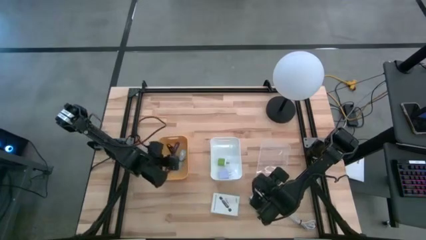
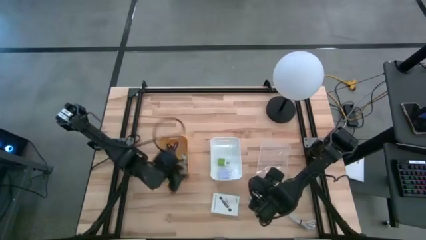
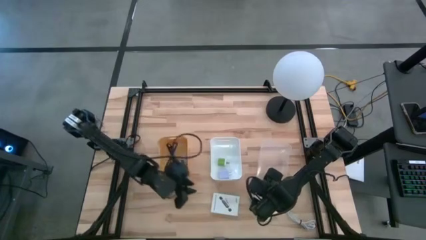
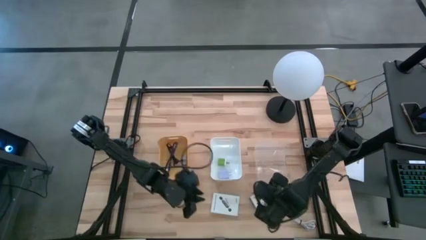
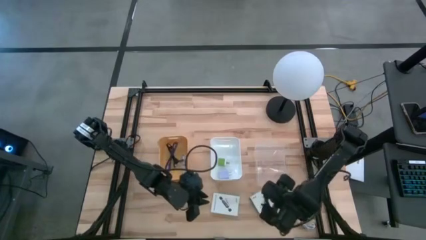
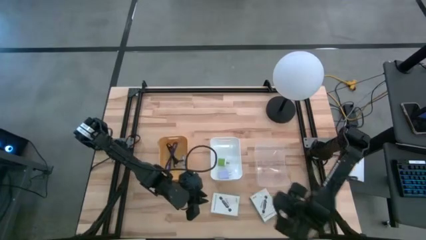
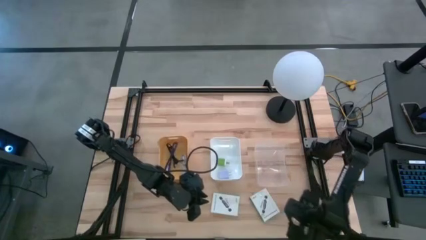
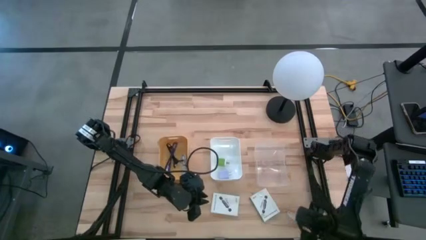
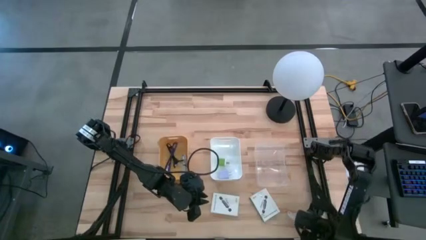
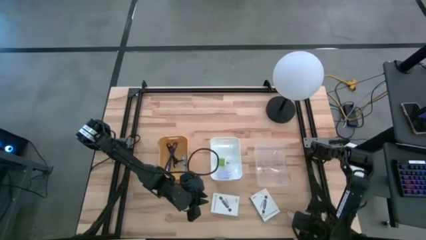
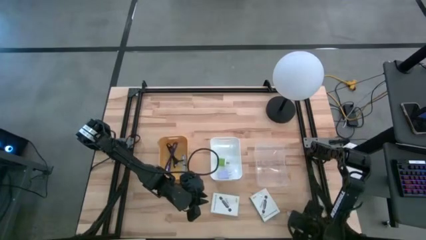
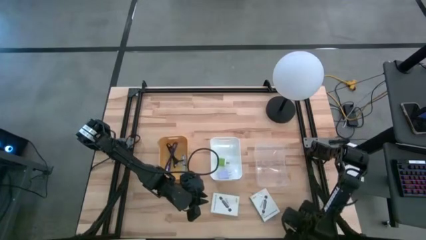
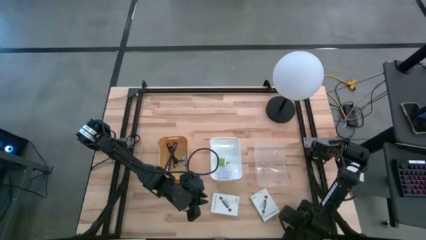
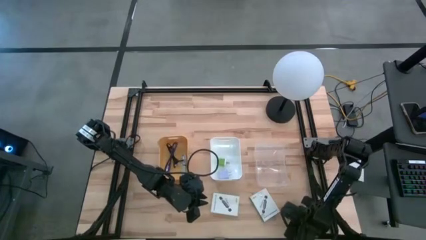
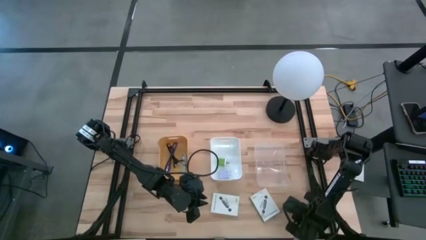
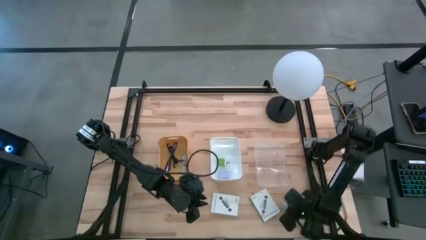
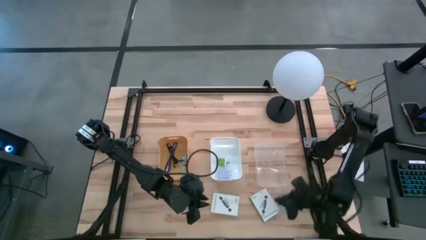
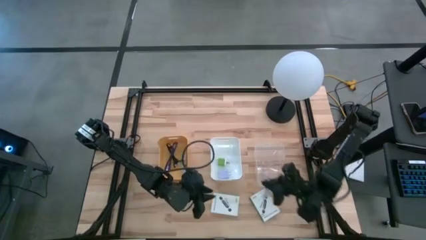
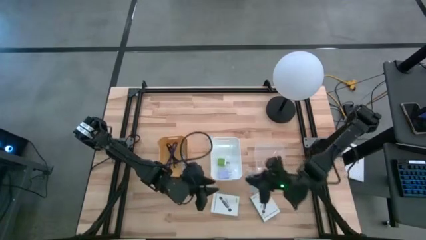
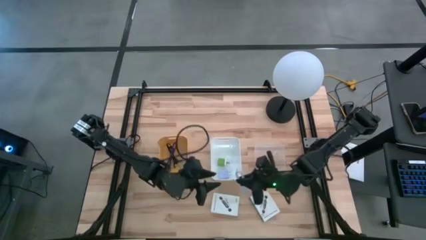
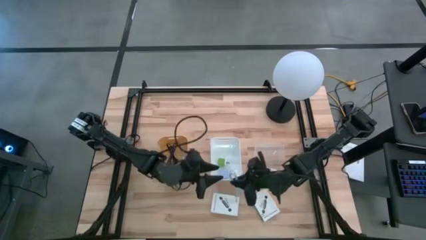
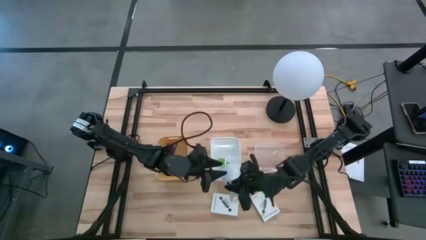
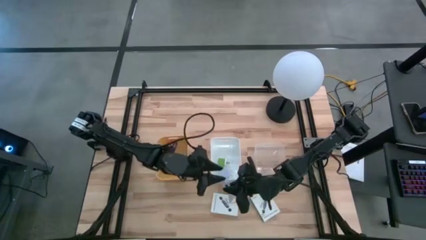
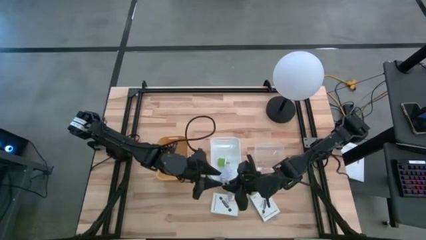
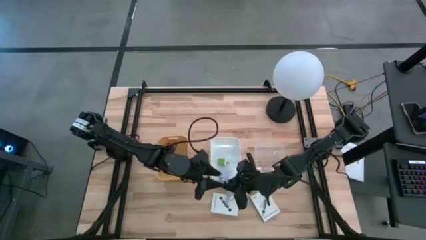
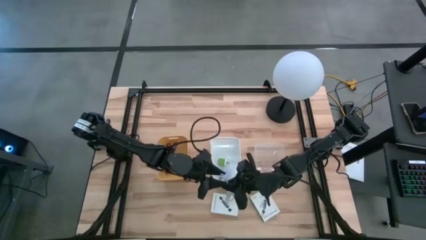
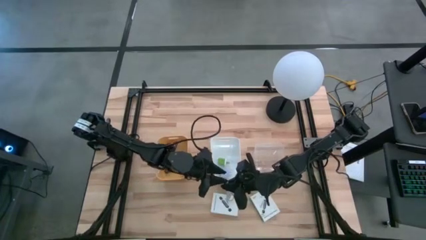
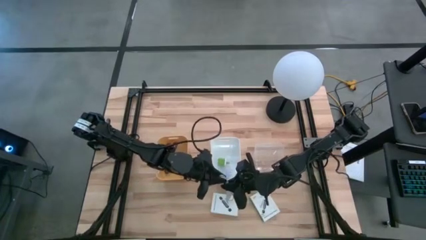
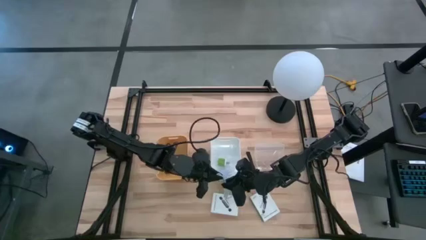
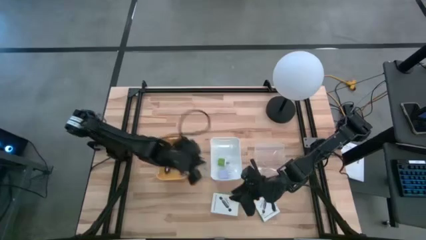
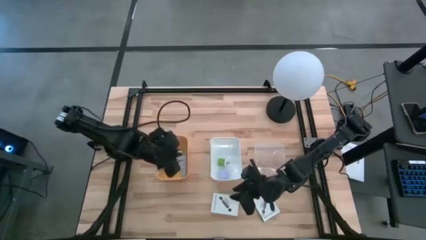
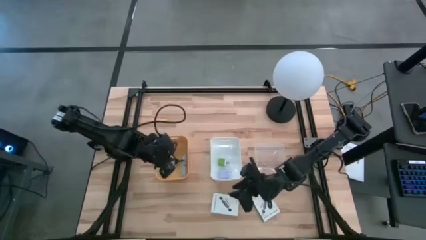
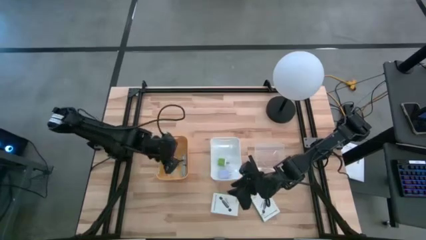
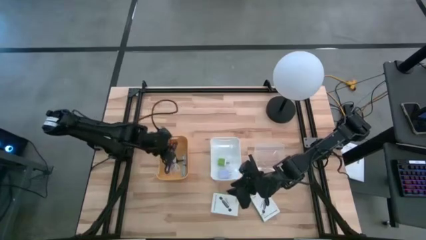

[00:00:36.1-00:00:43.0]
Task: Pick and place items into bin
Put the white charger cable into the yellow bin

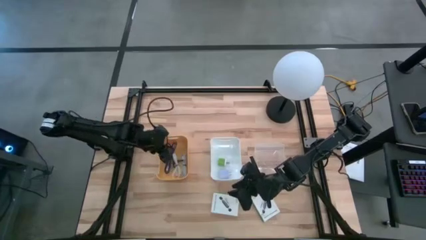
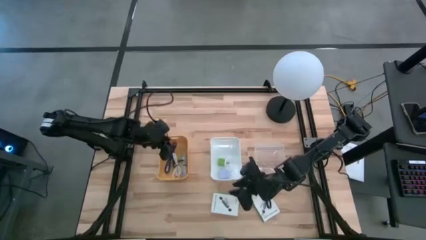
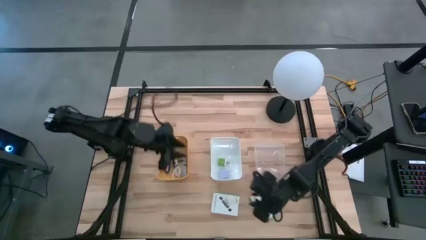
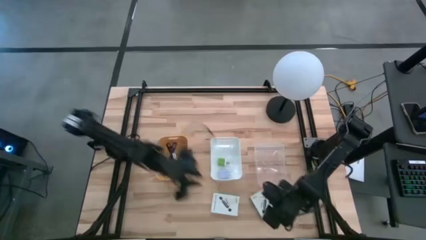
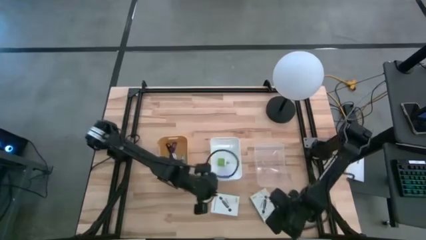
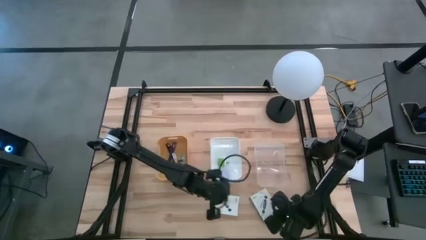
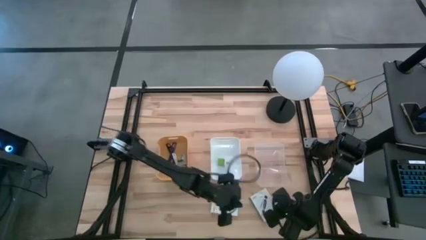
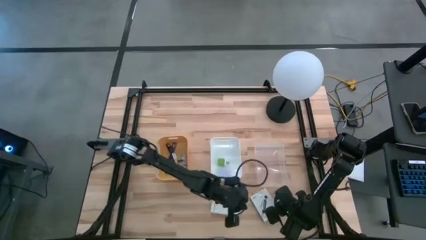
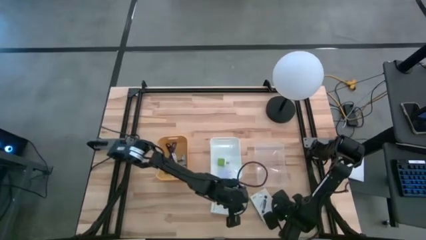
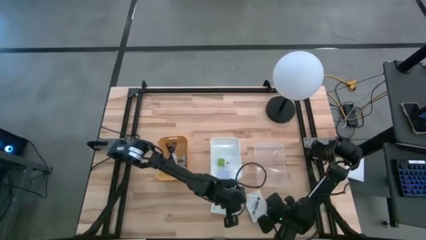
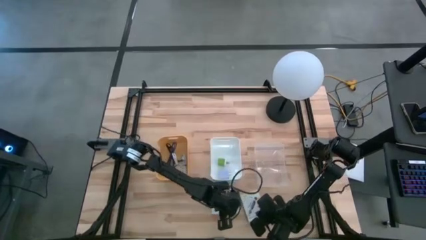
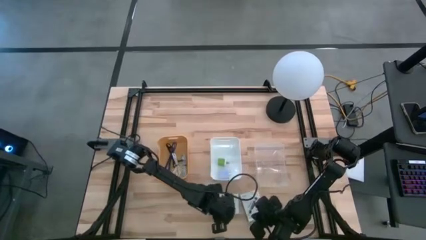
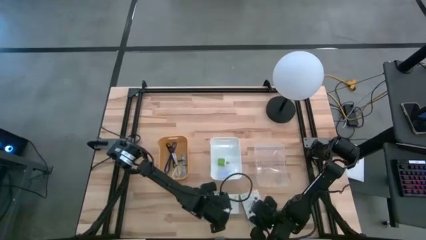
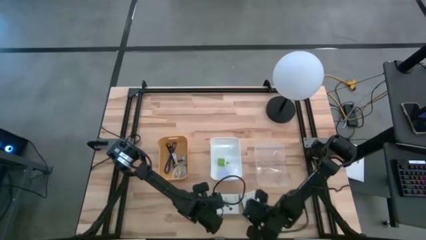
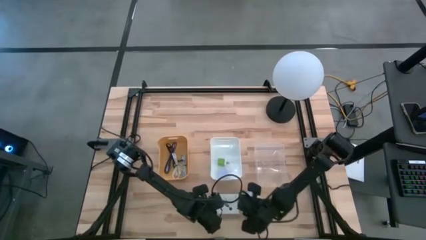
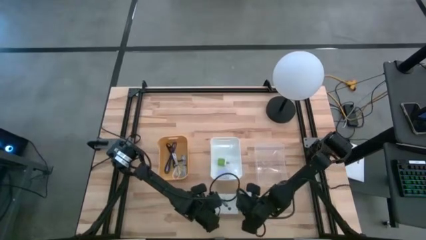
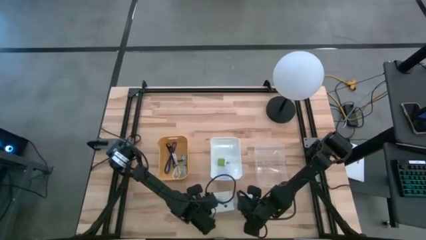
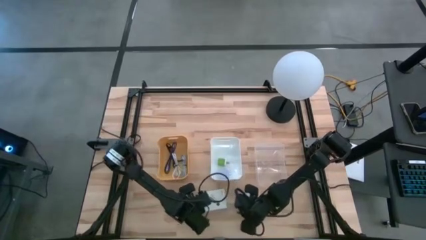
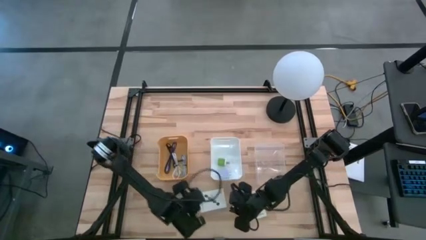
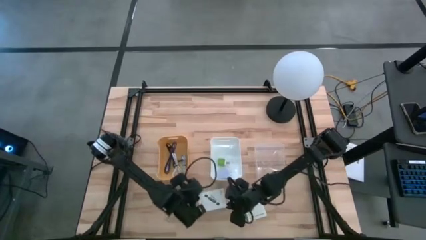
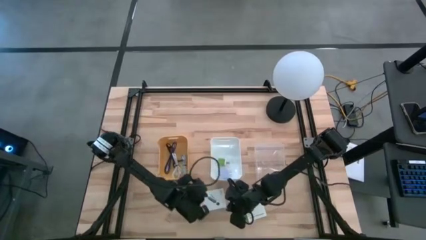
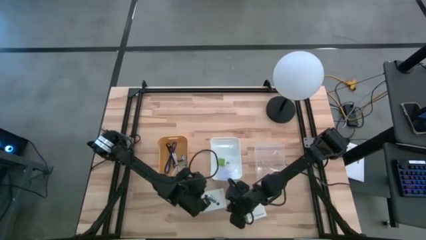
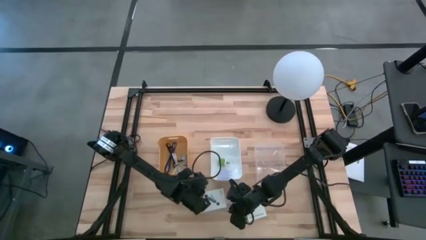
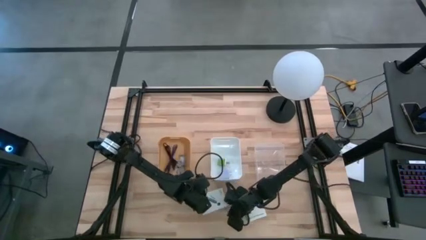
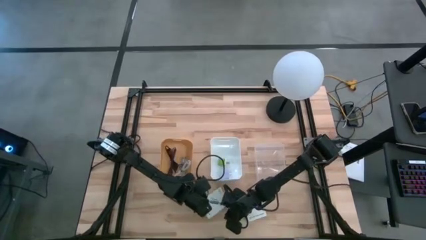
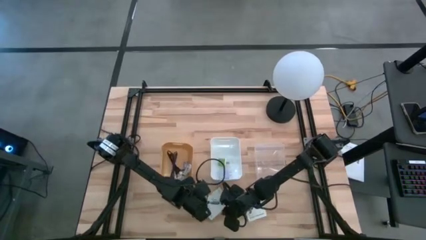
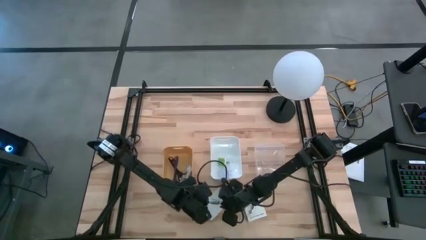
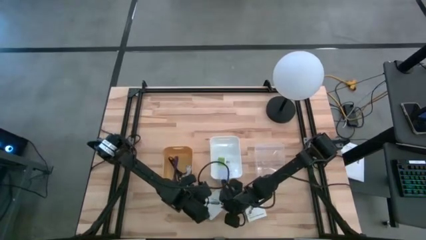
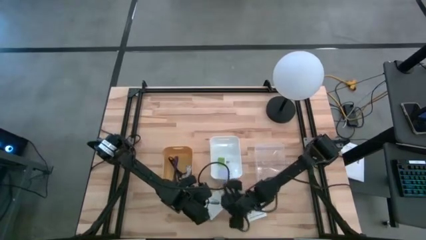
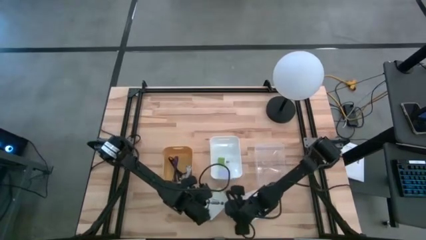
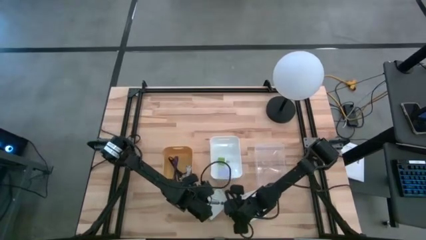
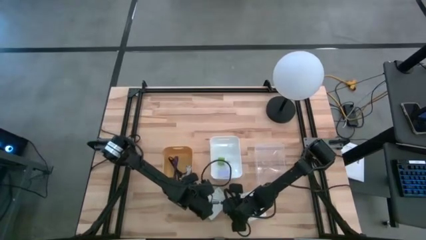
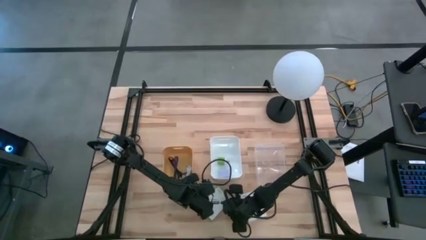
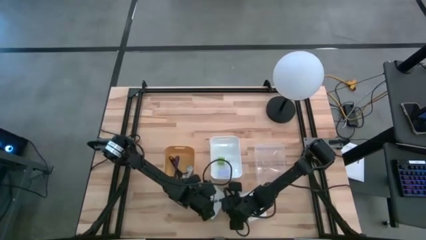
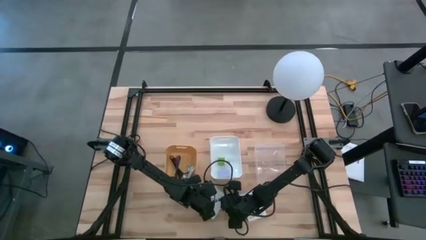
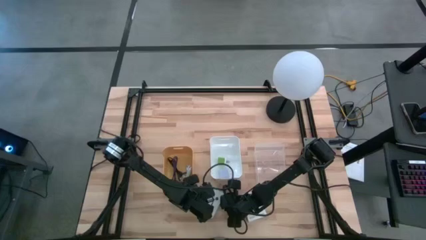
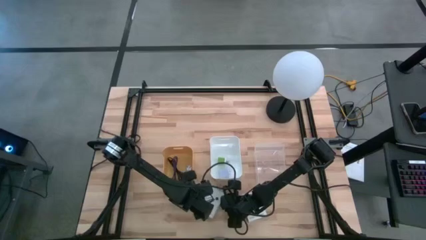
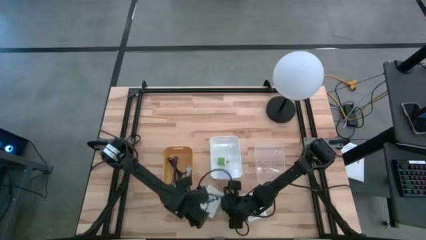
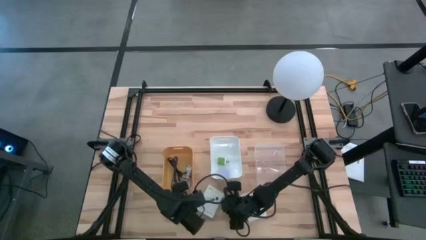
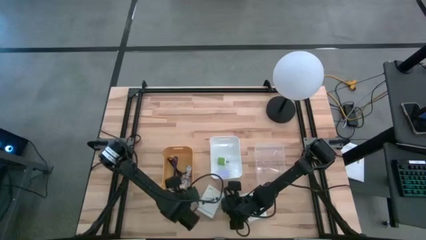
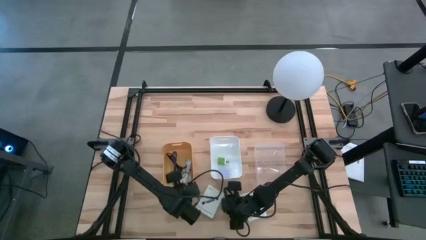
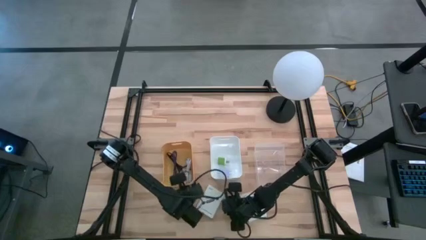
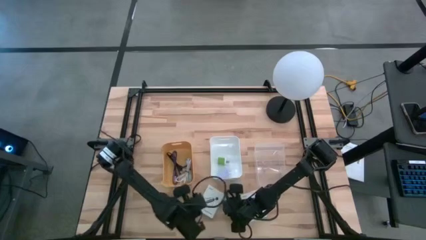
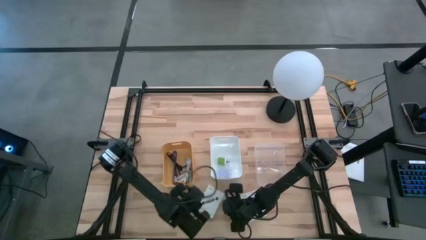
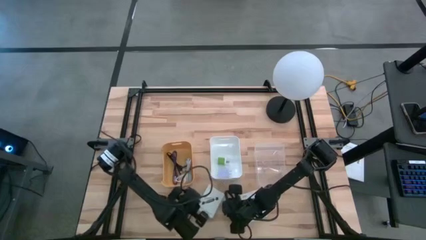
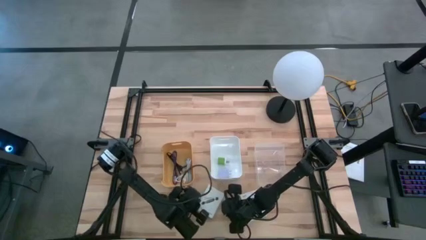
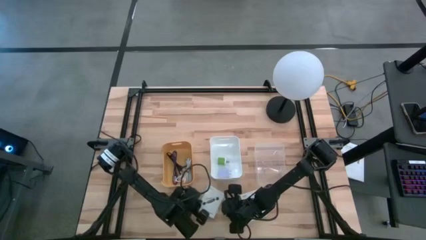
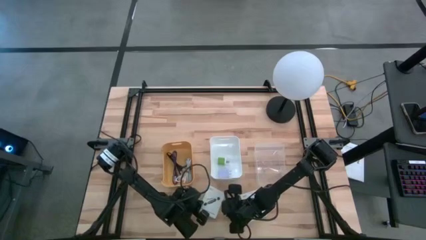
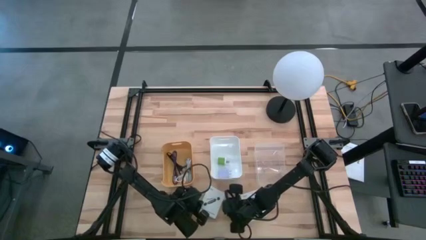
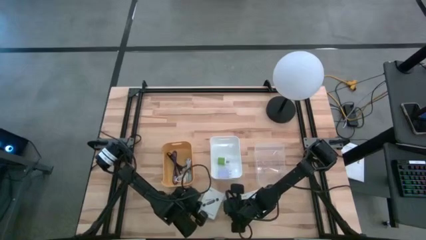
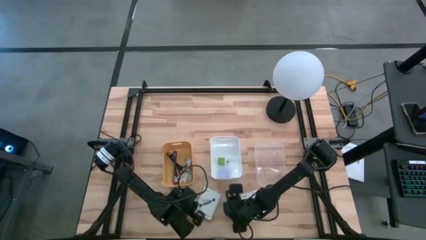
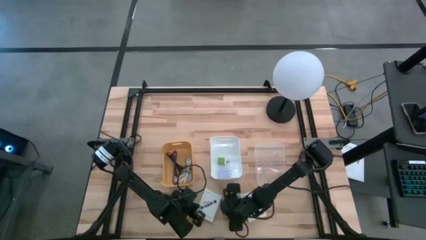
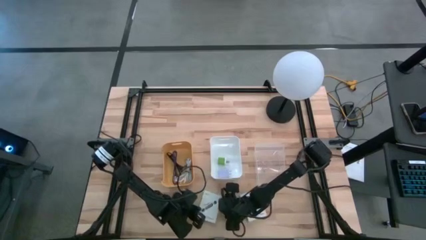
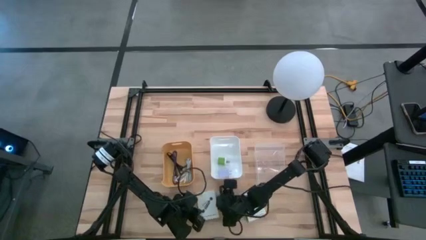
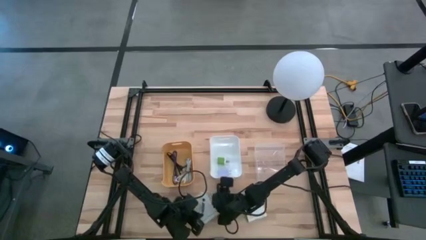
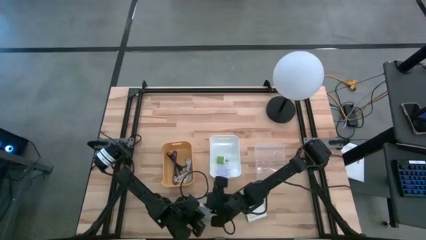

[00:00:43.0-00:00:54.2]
Put the left white card reader box into the transparent bin
